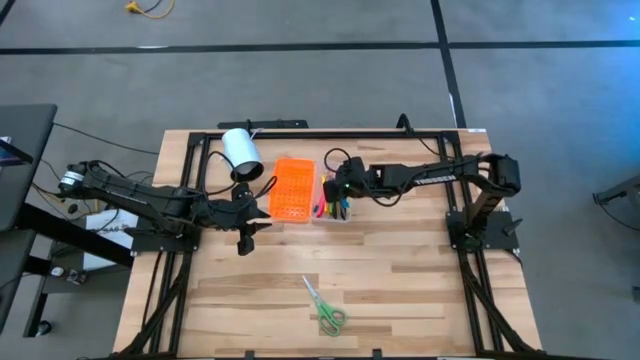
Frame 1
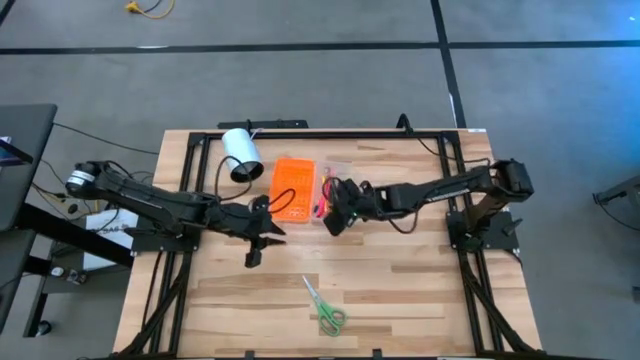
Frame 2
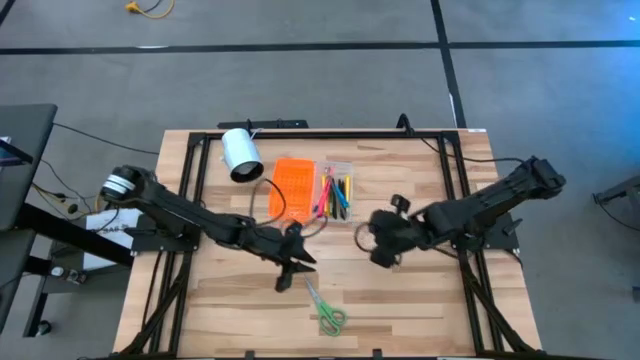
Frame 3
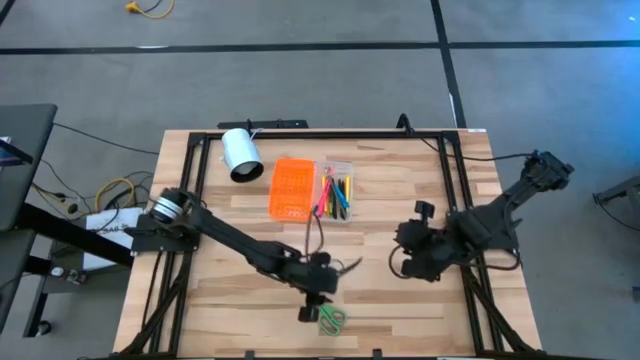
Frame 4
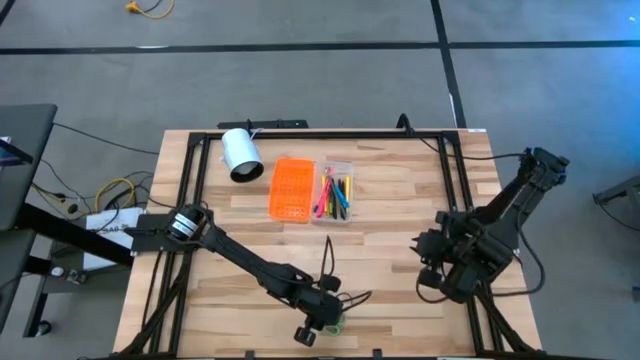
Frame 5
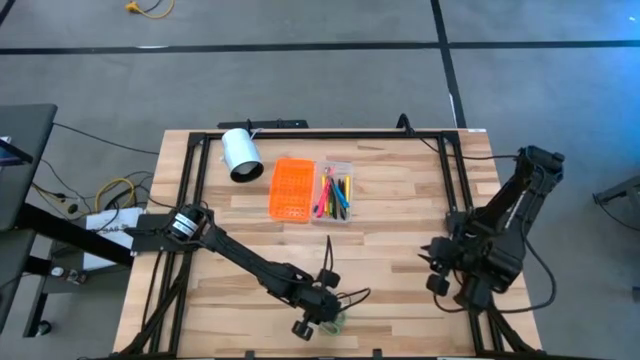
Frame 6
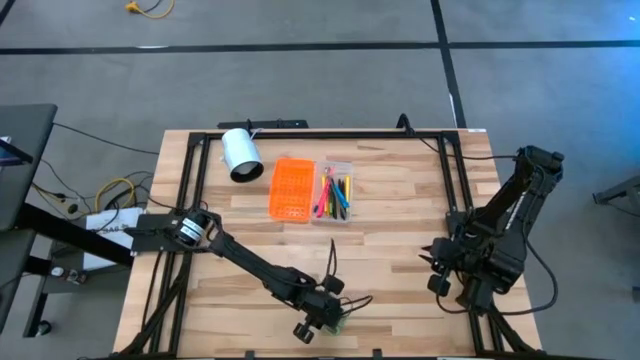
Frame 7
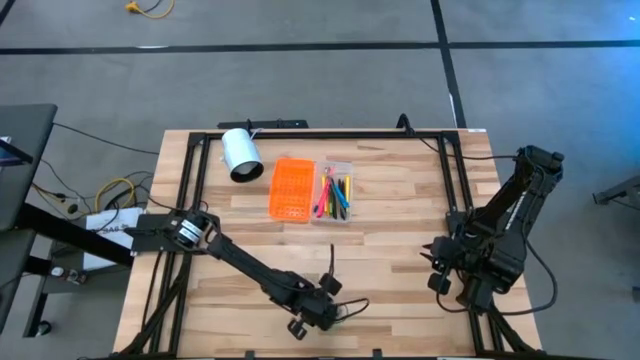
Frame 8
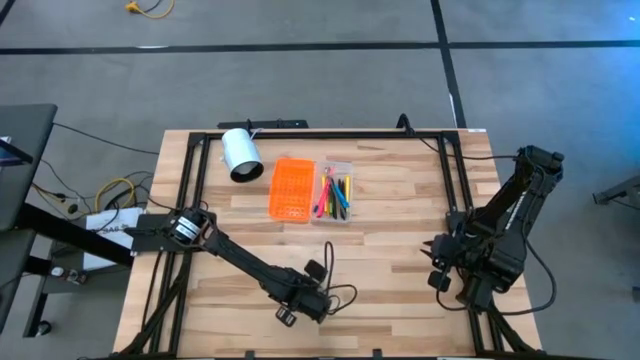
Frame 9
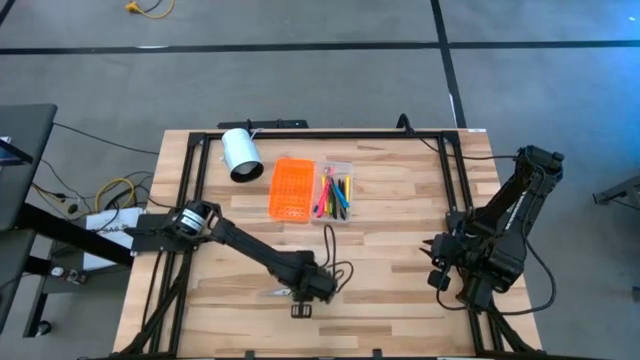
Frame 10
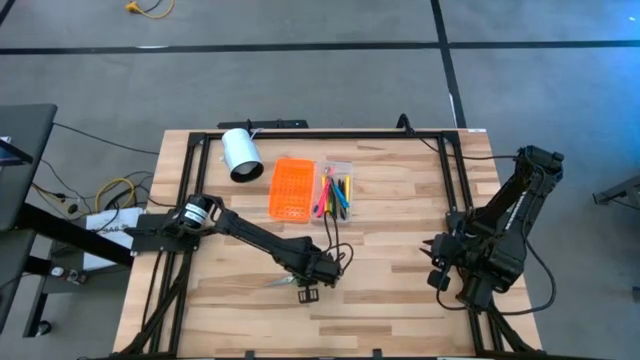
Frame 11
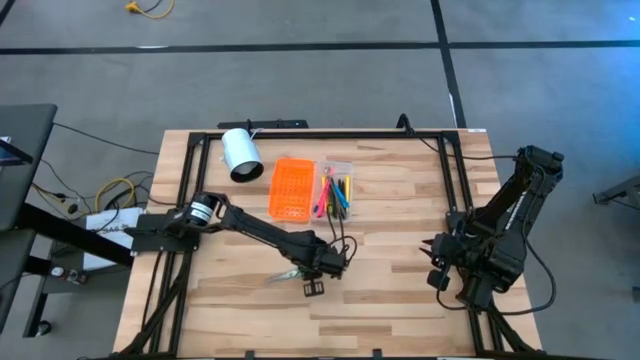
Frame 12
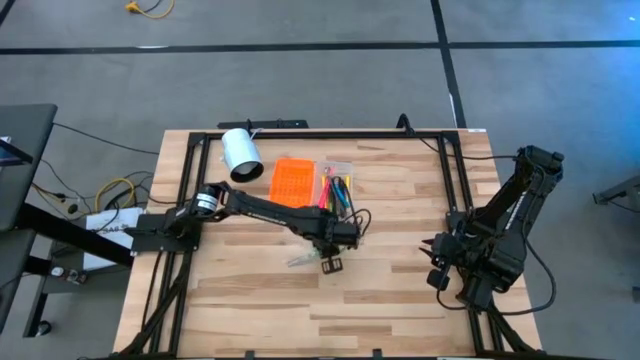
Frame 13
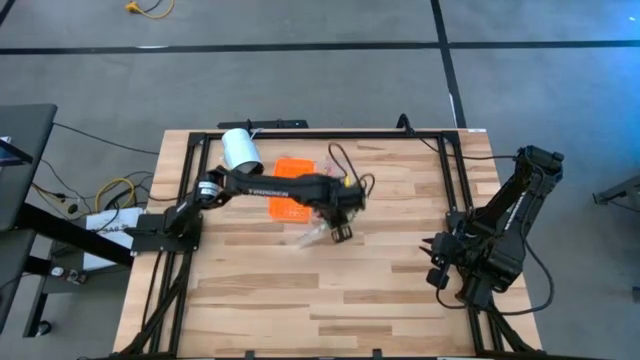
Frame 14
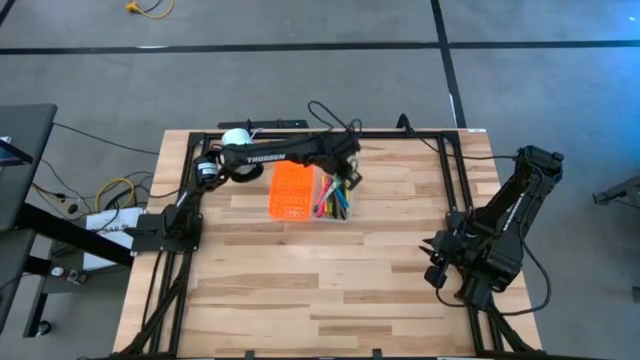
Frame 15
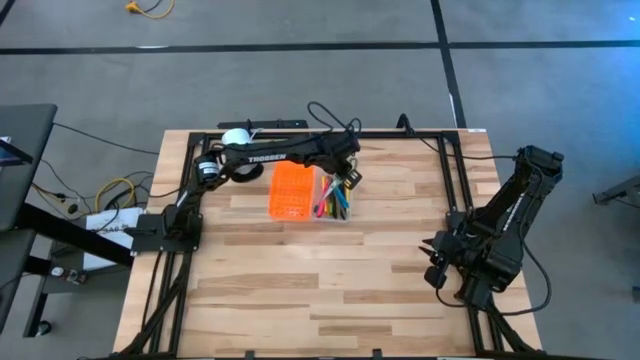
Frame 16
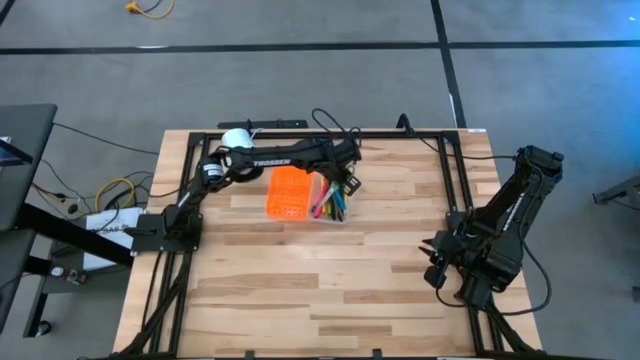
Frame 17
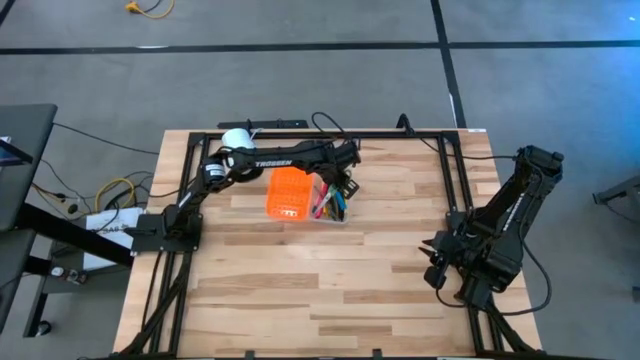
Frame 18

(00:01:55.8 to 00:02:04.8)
Task: Pick & place school supplies into a supply box
Put the green scissors into the orange supply box

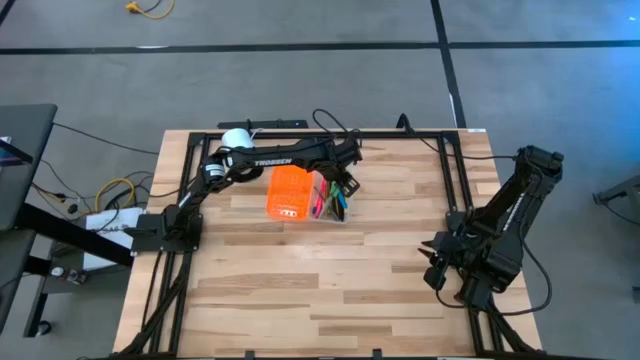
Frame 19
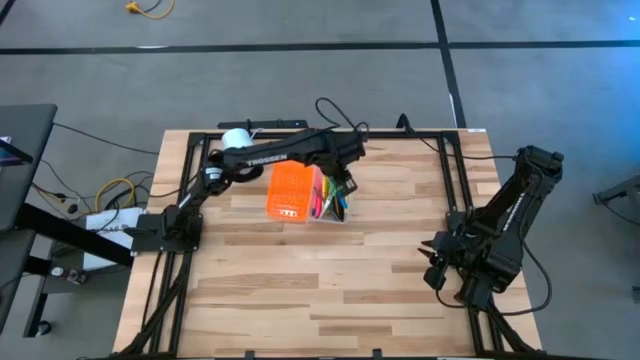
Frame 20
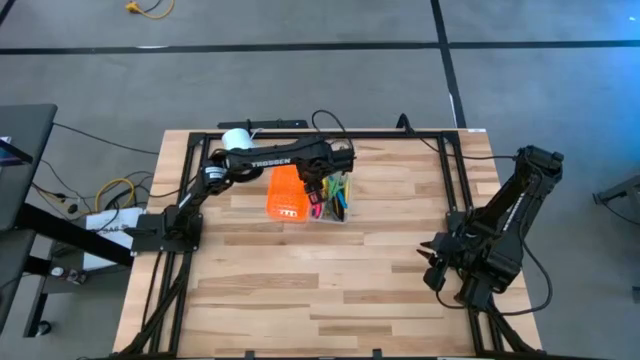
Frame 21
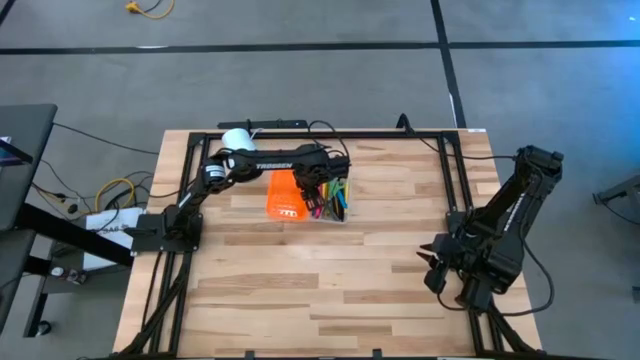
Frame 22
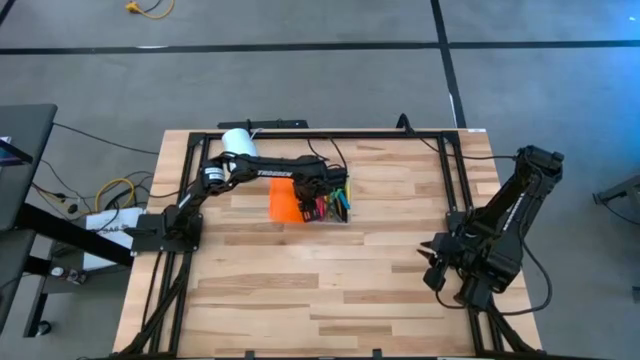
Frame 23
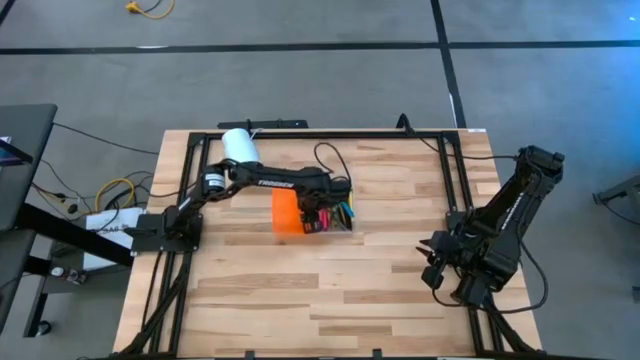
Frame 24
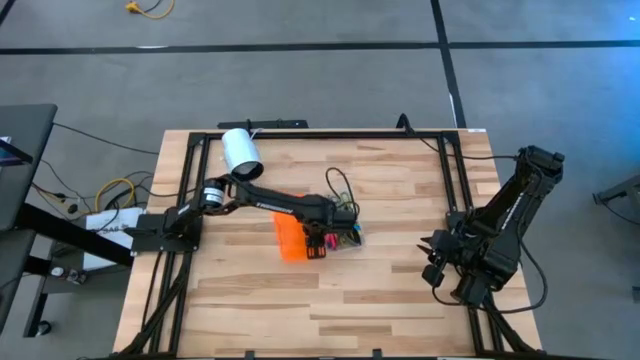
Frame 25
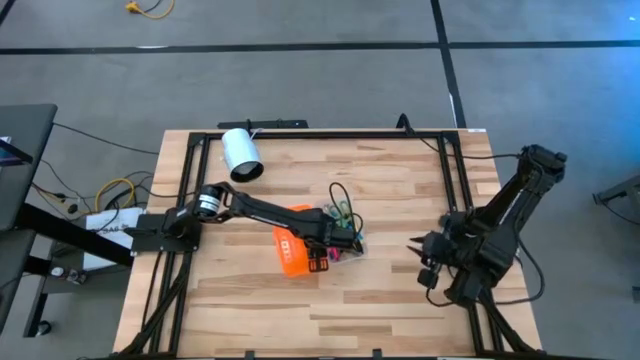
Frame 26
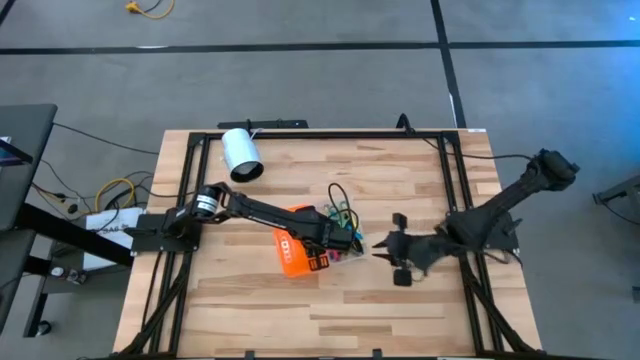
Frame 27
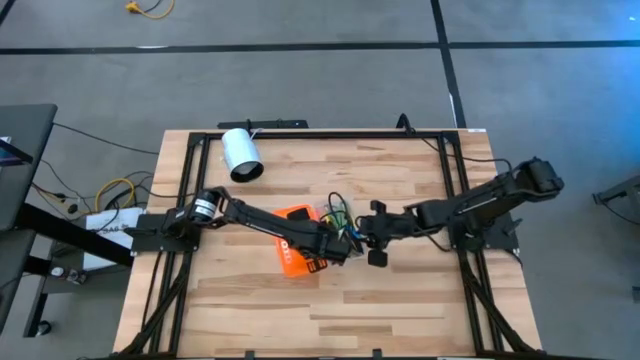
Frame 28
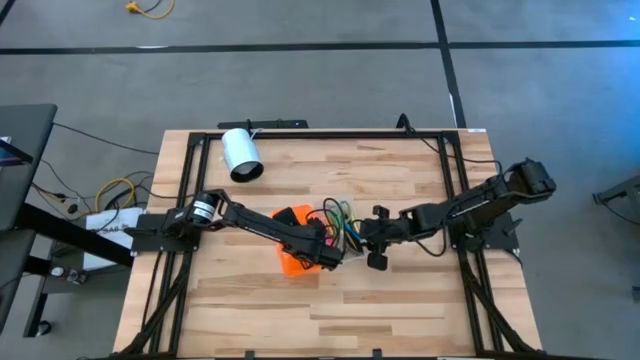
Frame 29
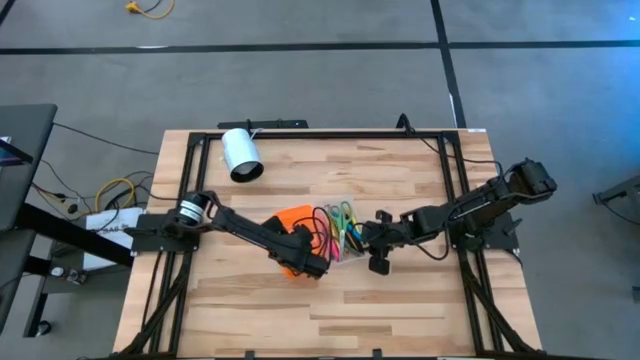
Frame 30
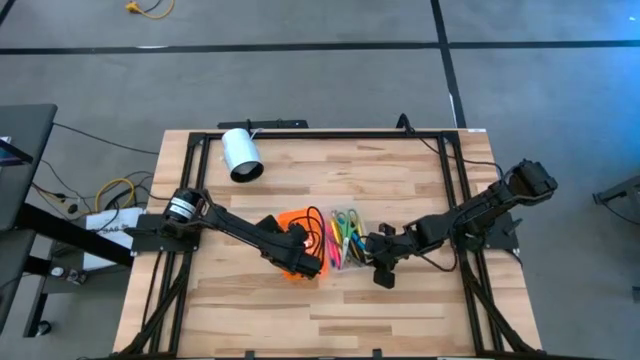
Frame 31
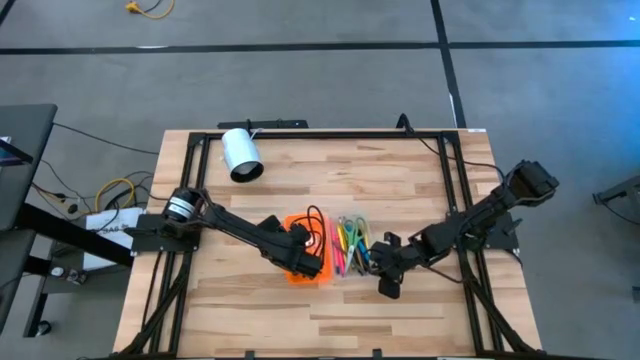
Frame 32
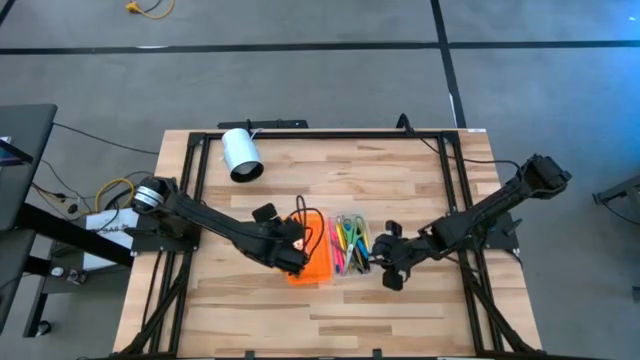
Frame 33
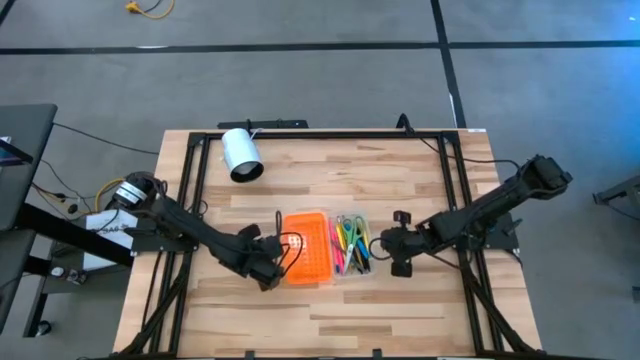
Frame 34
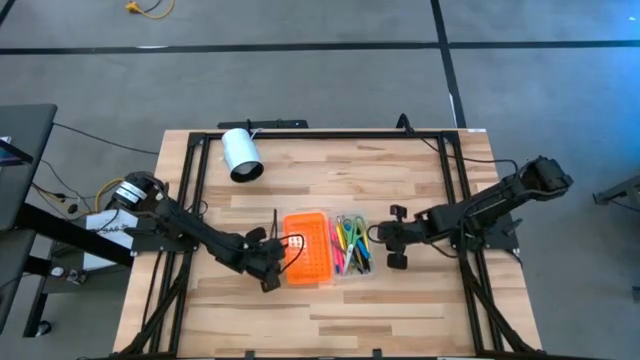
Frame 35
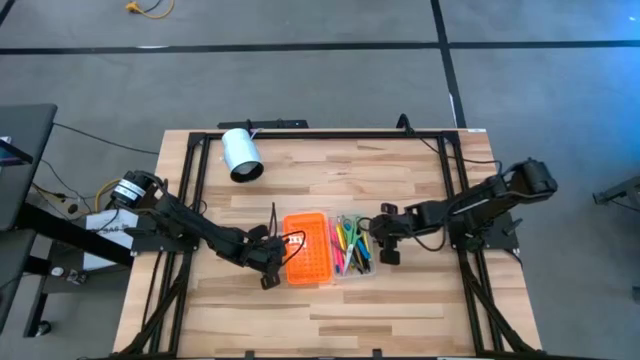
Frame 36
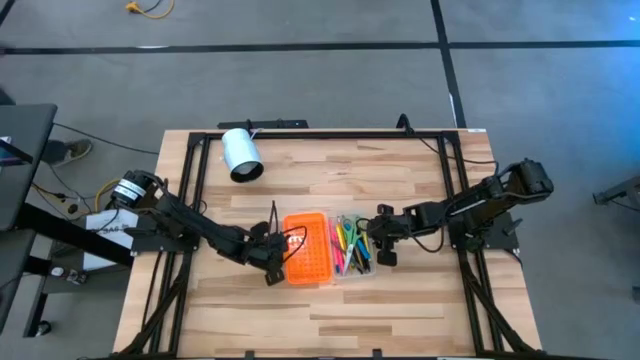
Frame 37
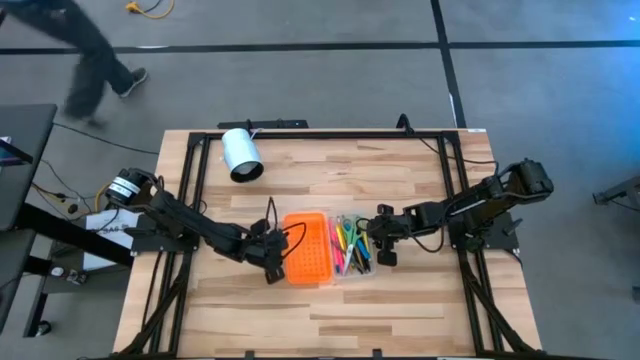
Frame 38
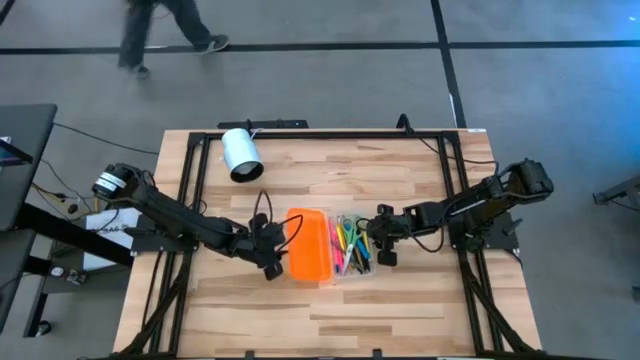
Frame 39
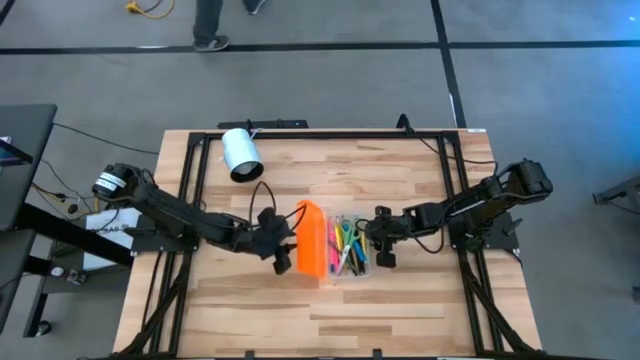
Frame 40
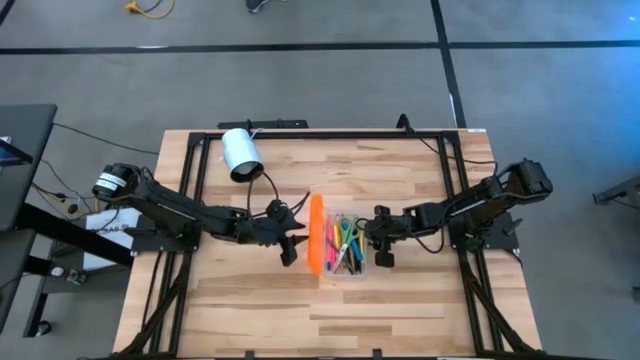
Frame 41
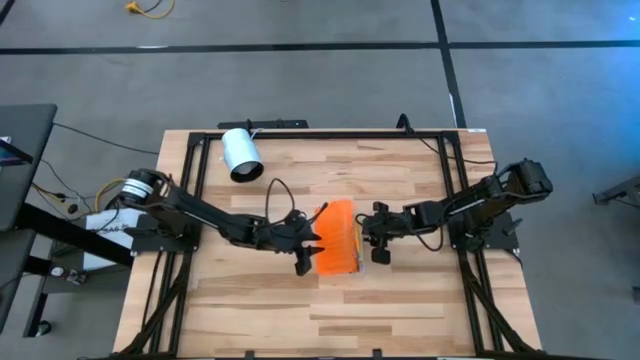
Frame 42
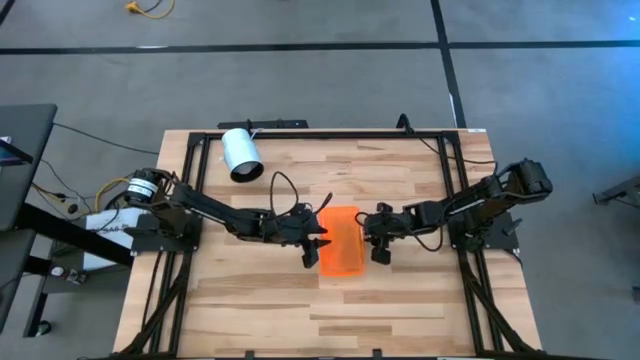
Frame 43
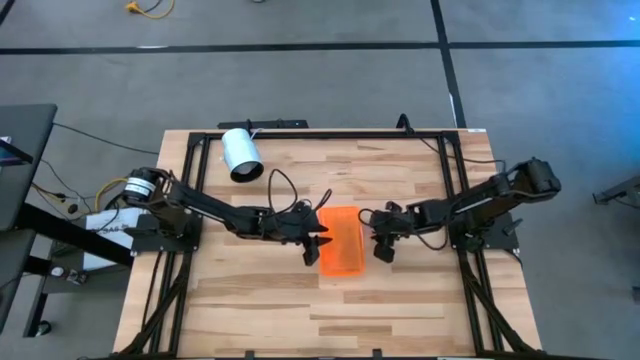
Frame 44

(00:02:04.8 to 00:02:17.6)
Close the orange supply box
